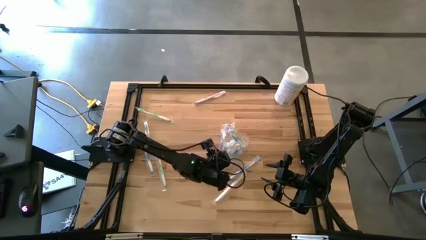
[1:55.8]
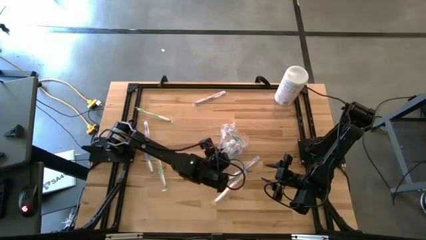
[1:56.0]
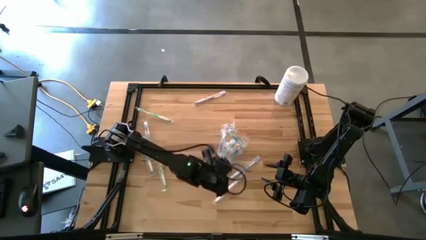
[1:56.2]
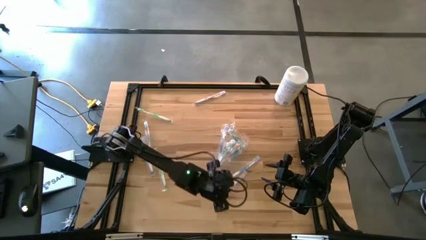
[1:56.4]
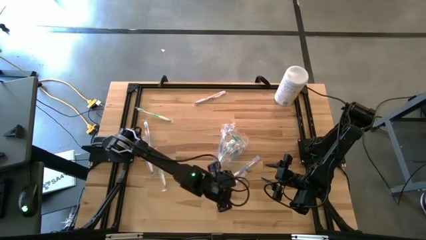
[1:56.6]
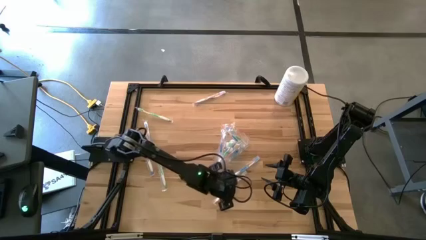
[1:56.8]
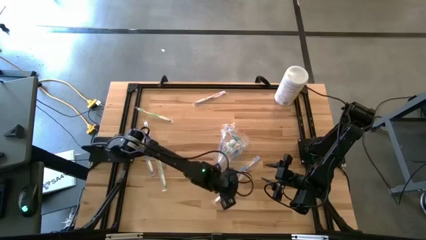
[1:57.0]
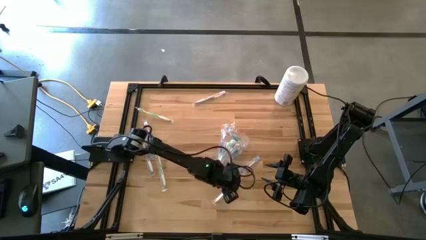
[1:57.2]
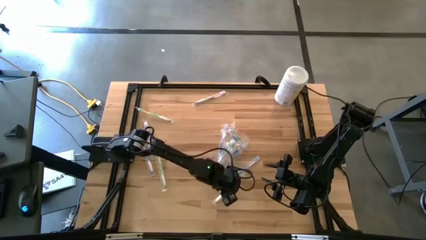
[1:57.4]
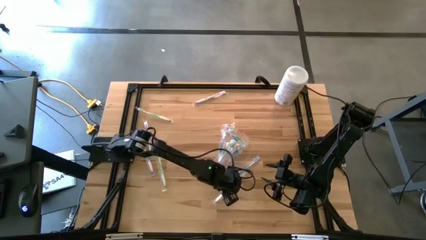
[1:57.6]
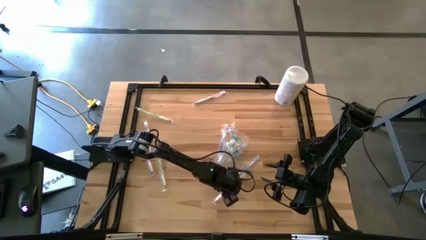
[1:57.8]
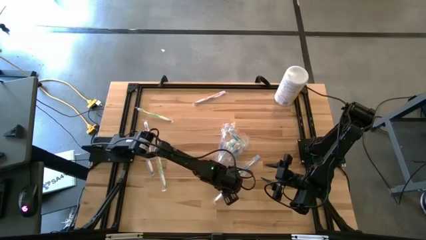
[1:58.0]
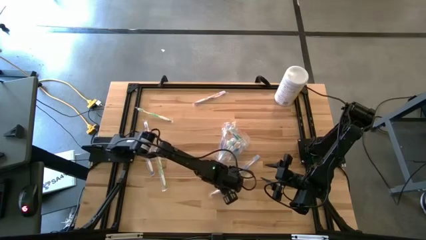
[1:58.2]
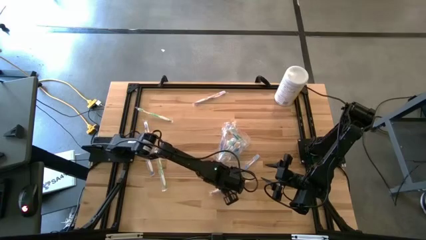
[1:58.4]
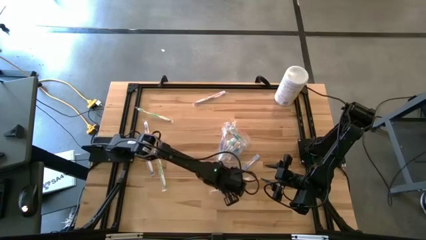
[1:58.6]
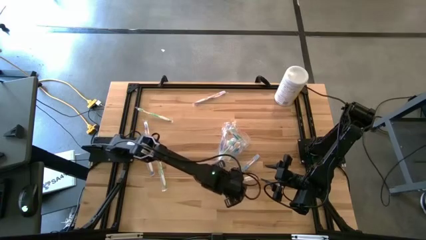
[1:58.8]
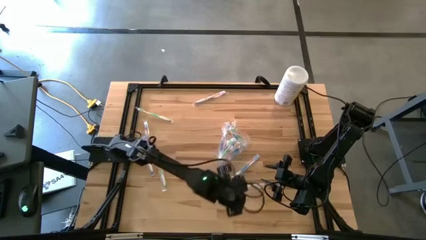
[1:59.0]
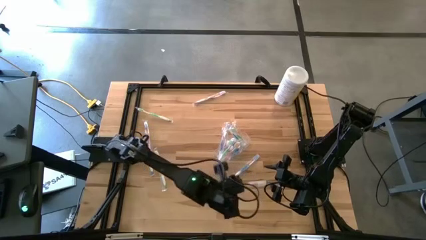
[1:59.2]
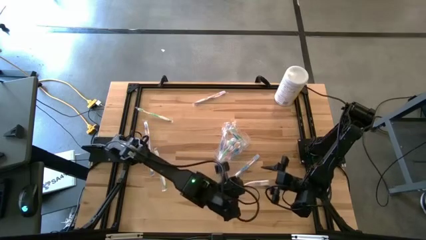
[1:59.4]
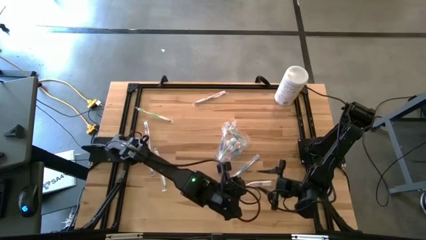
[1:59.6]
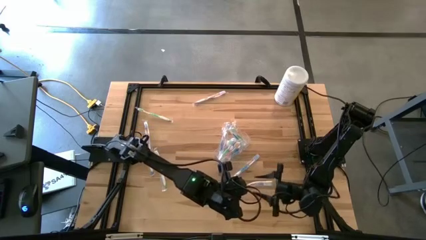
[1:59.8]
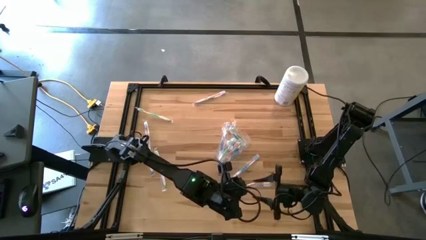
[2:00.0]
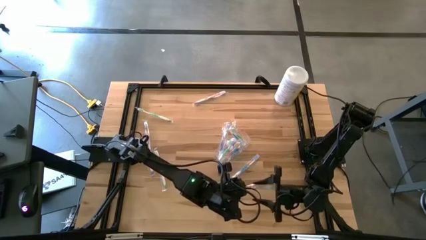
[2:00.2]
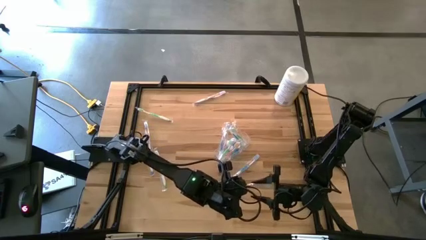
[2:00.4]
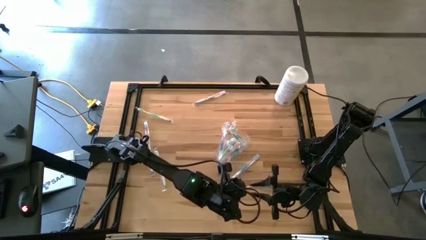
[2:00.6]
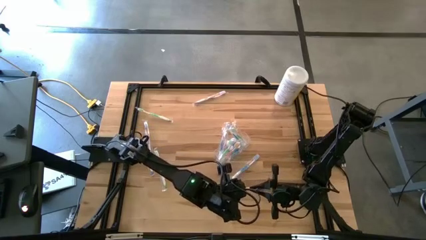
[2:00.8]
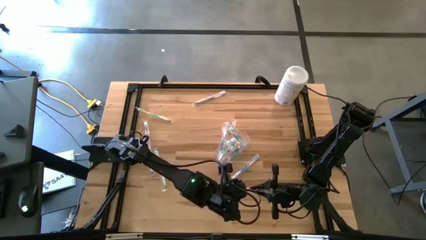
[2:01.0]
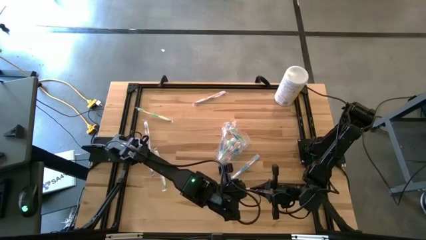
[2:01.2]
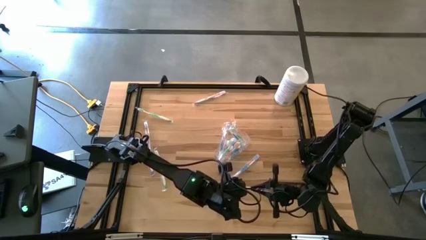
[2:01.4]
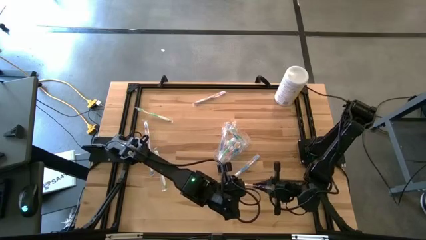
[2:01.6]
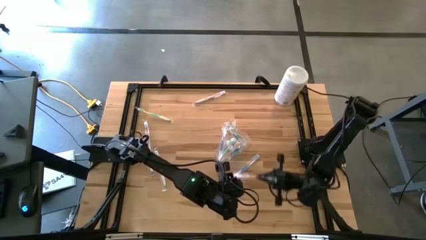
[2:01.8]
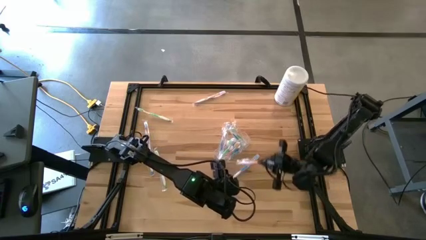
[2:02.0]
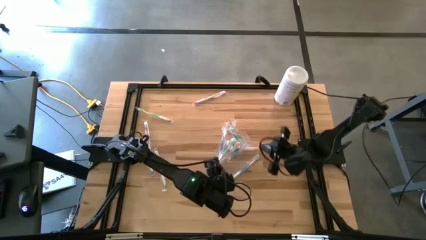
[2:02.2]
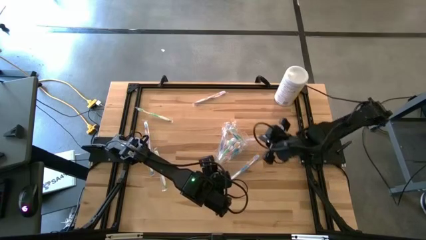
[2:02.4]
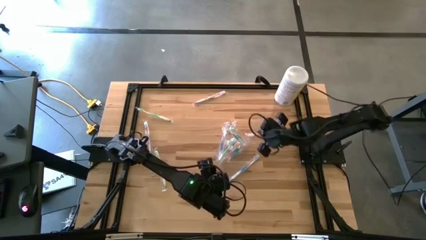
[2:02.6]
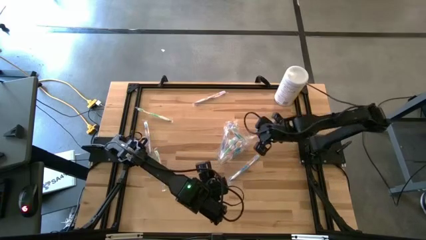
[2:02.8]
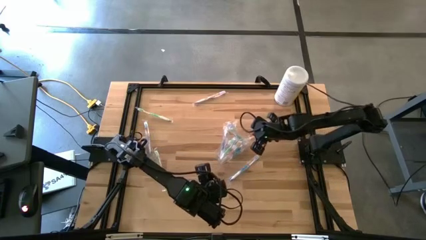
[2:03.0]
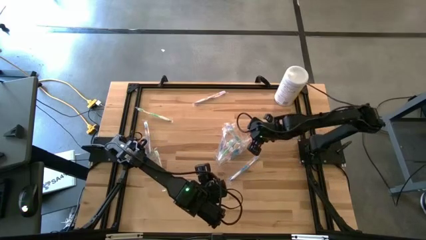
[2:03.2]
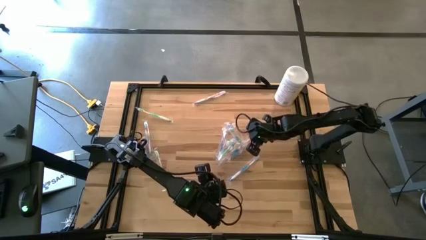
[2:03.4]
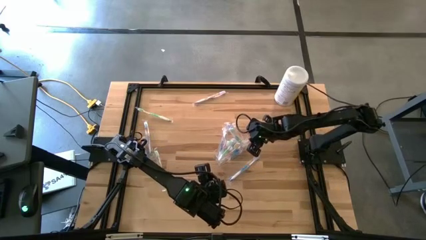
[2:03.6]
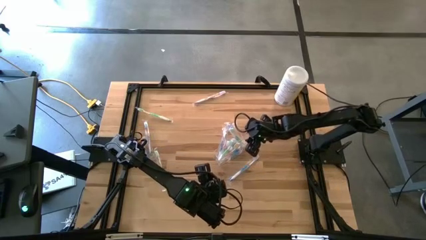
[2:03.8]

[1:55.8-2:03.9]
Task: Pick & Place toothbrushing station
Put the orange toothbrush into the transparent organizer

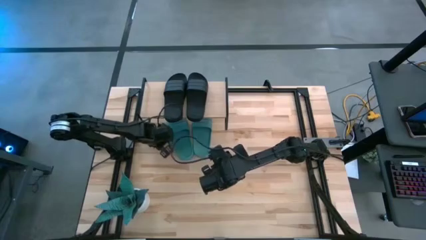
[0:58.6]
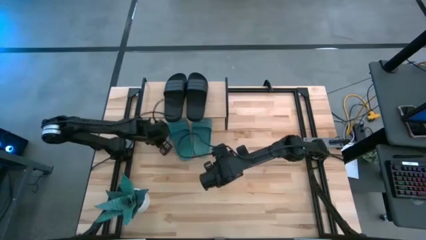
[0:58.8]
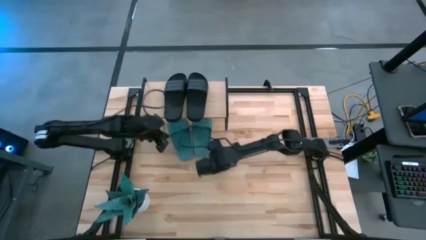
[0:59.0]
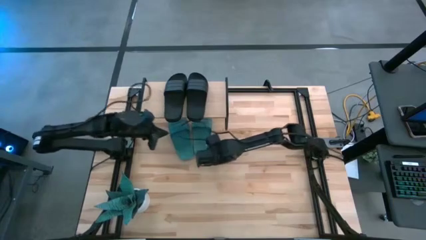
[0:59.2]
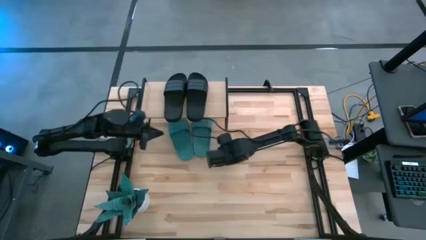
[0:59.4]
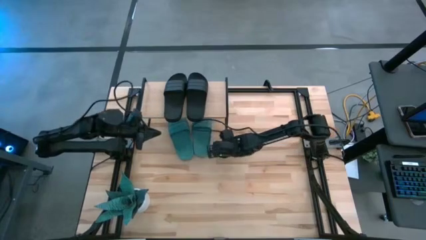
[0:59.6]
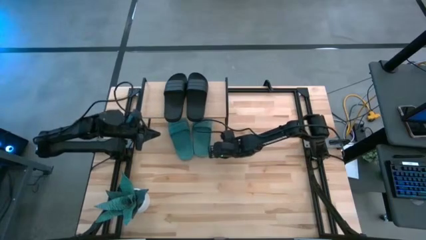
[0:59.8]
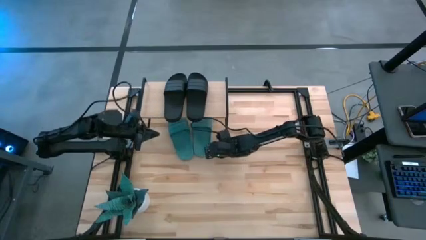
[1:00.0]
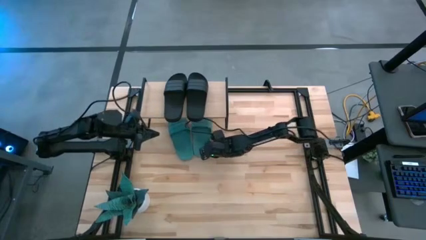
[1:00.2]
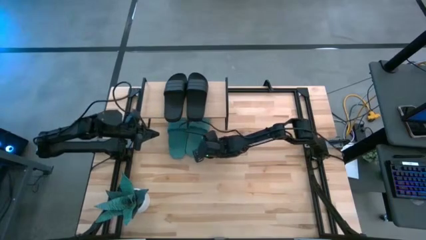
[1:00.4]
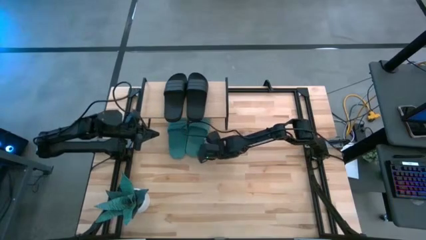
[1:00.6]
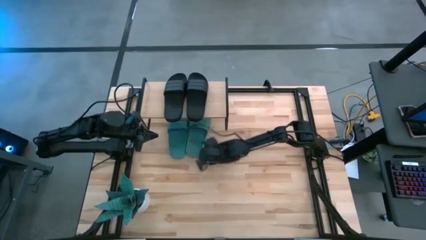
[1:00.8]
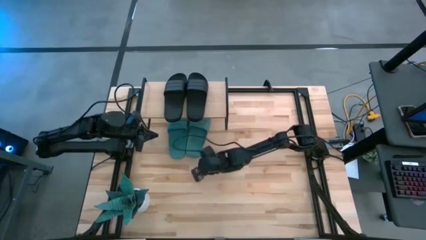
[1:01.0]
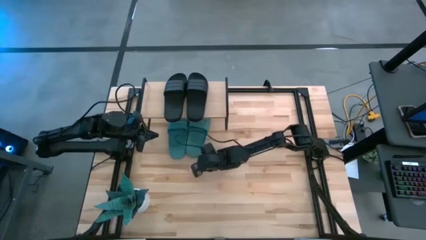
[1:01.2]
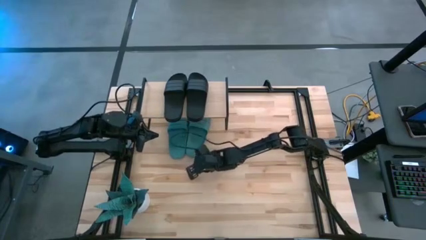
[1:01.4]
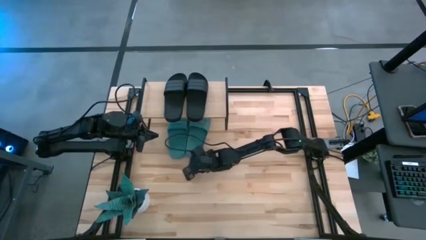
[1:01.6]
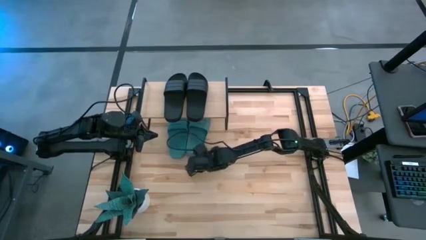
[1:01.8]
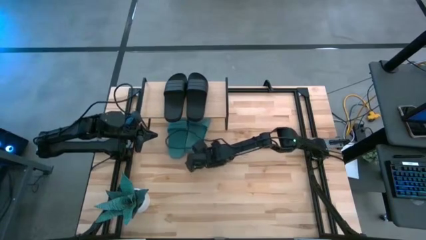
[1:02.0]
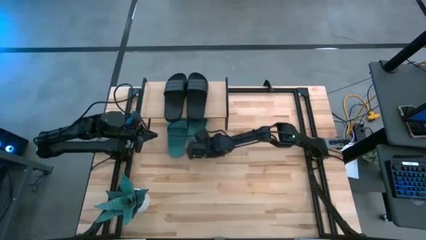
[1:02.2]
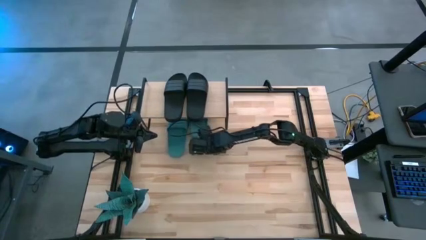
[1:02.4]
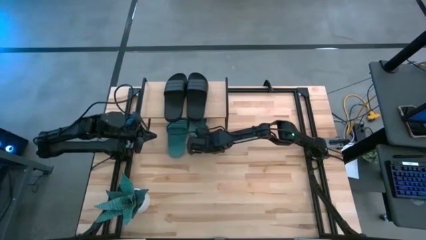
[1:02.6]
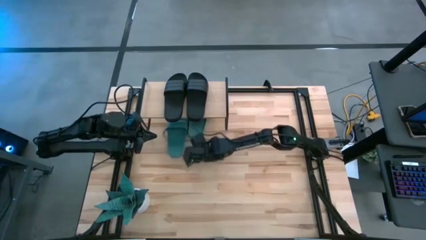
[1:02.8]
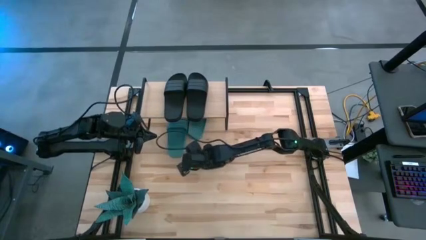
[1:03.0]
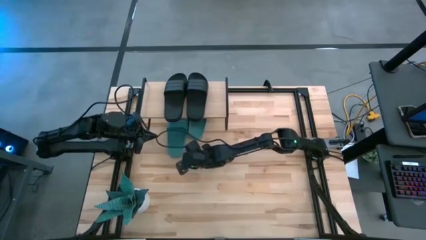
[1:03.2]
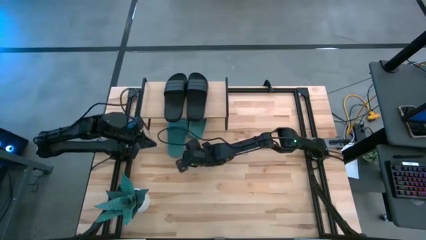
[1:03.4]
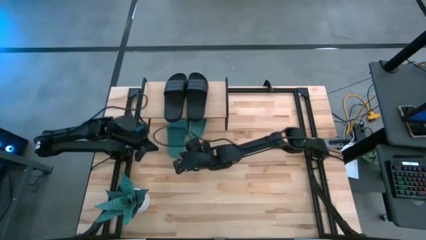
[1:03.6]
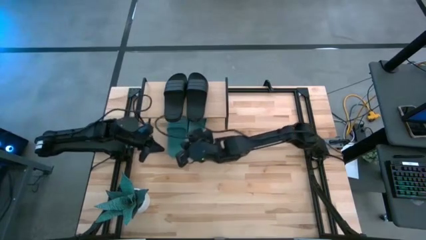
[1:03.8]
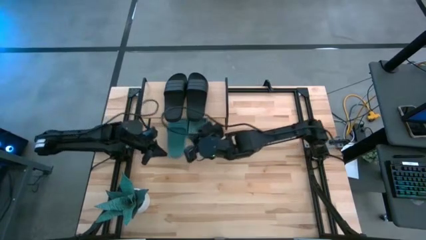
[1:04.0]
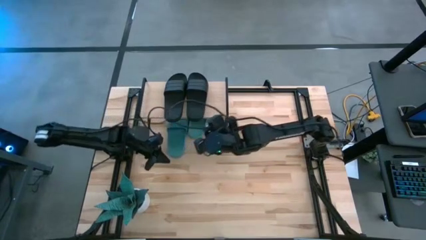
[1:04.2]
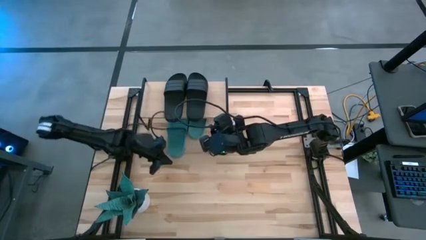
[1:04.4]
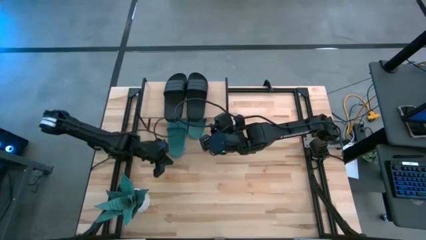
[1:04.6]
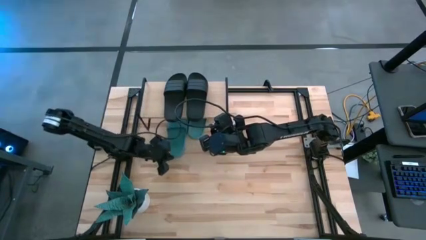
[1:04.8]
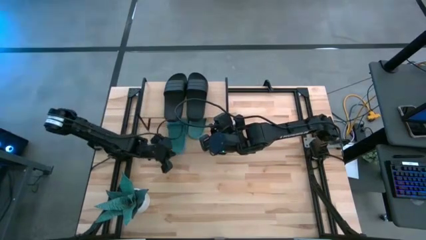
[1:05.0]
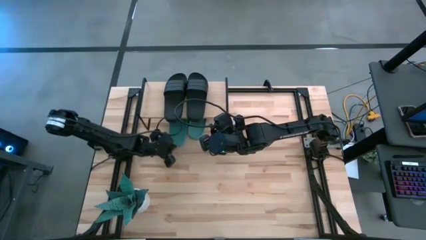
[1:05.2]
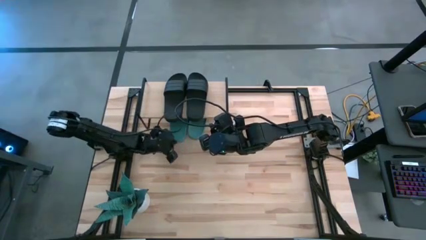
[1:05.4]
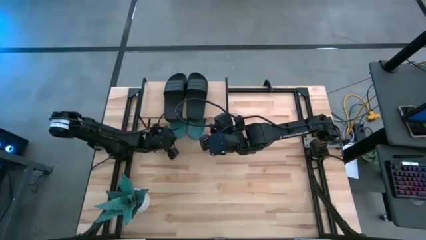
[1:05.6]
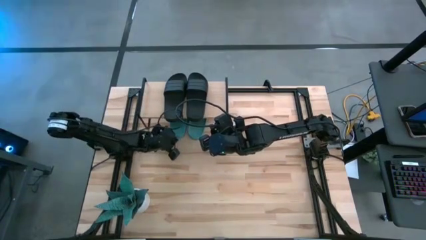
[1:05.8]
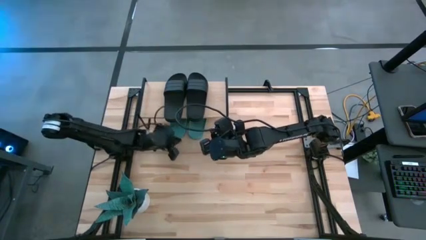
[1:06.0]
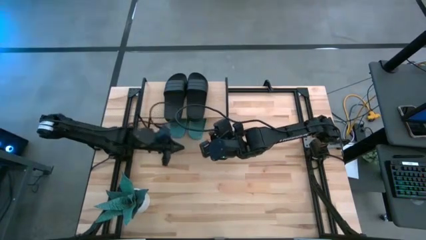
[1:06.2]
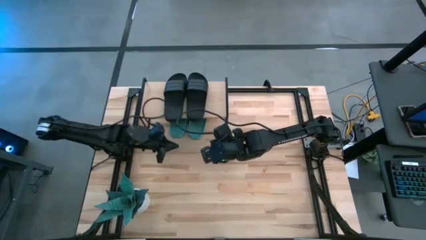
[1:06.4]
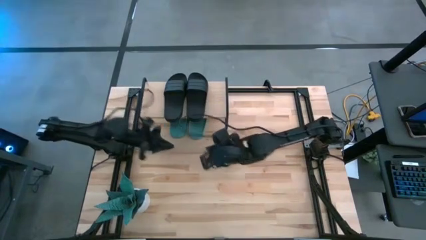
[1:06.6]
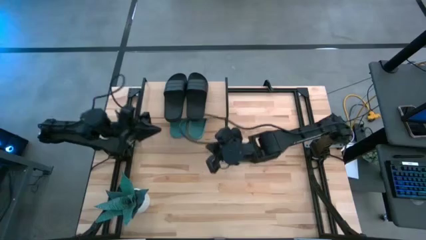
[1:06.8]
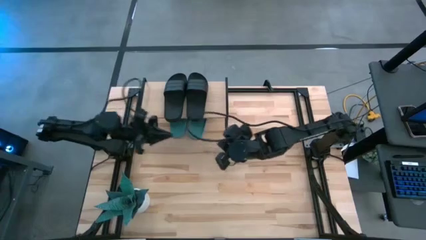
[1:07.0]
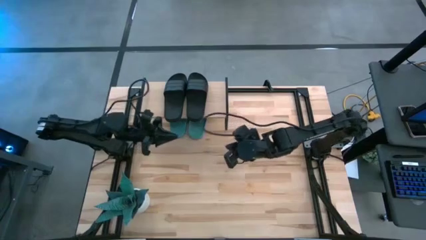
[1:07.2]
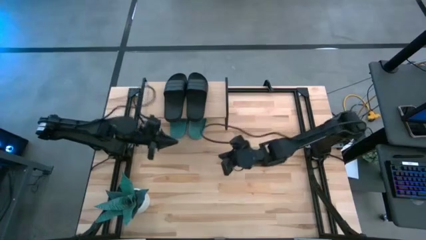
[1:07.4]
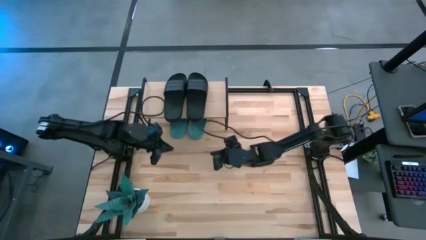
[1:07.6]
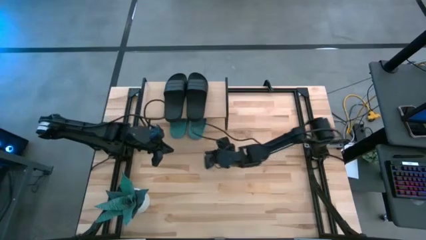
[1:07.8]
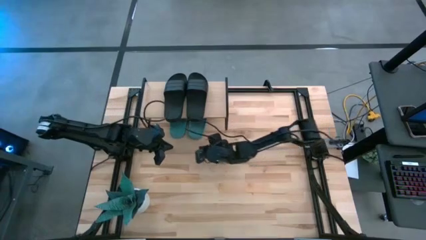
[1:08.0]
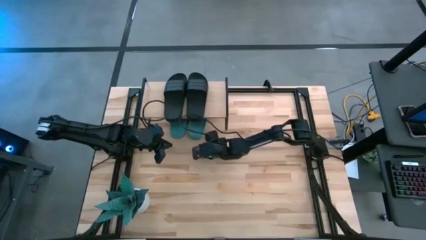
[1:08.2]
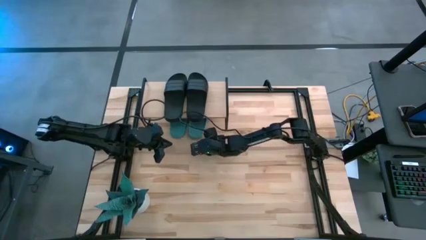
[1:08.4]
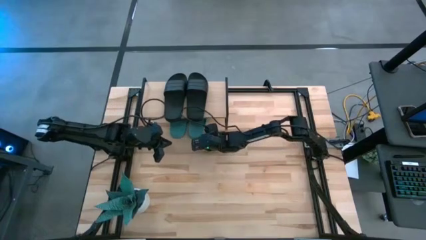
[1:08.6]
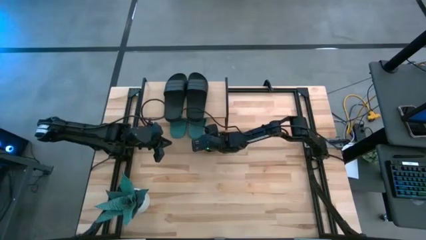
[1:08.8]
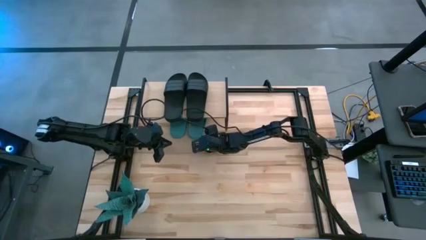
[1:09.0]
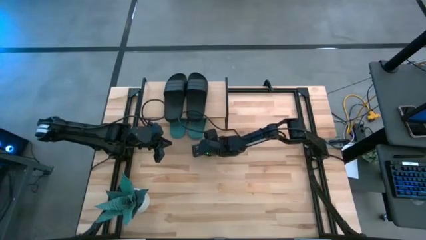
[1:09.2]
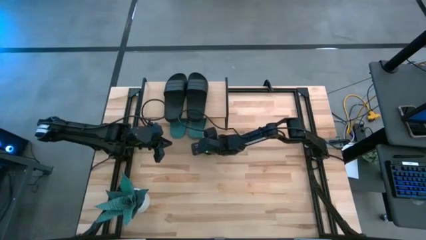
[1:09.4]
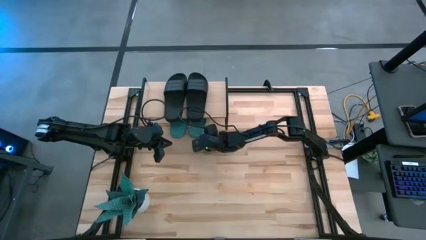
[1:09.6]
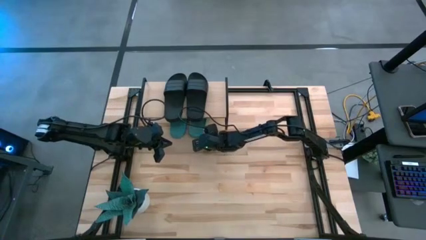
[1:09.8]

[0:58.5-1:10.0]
Task: Pick and place slides into the shelf
Adjust the slides
